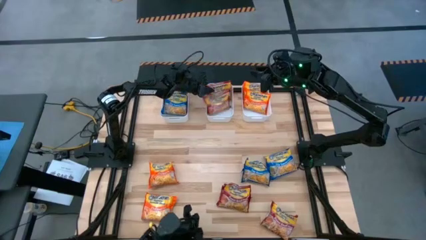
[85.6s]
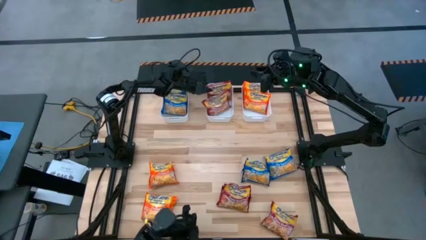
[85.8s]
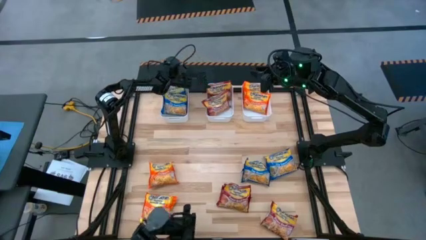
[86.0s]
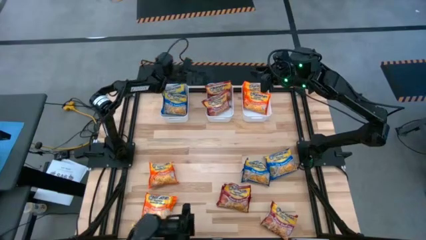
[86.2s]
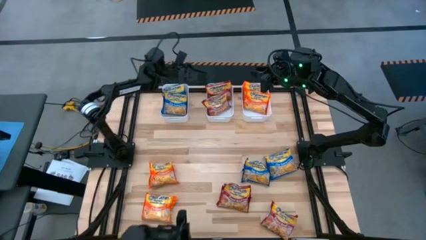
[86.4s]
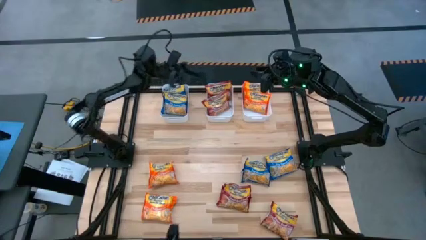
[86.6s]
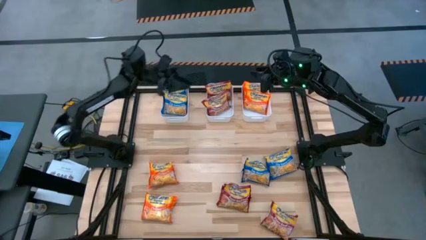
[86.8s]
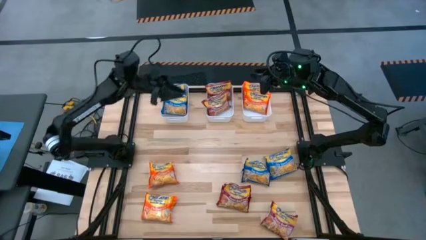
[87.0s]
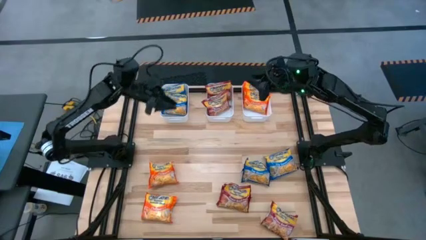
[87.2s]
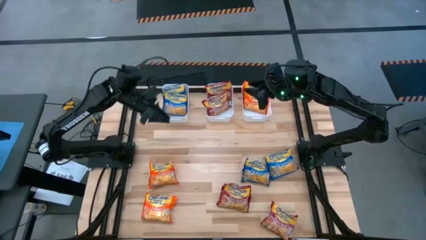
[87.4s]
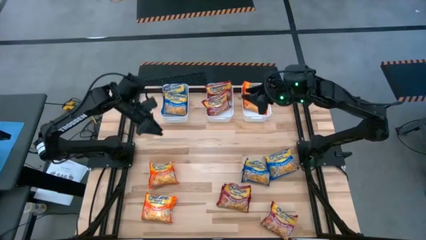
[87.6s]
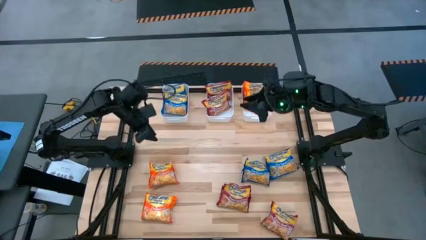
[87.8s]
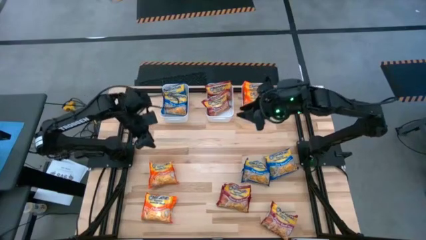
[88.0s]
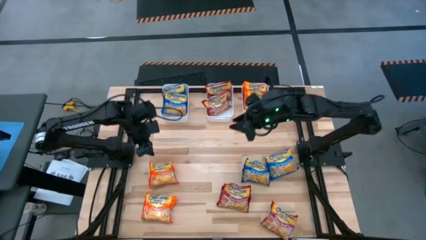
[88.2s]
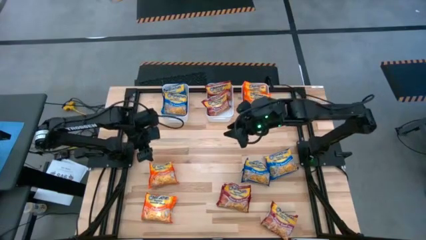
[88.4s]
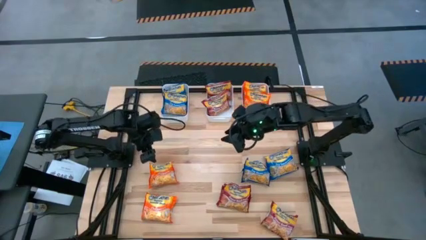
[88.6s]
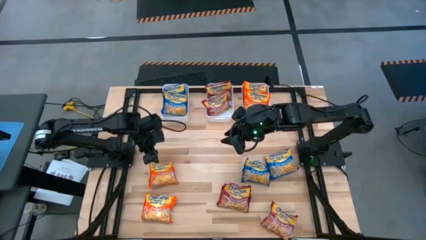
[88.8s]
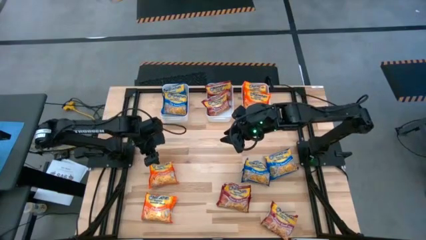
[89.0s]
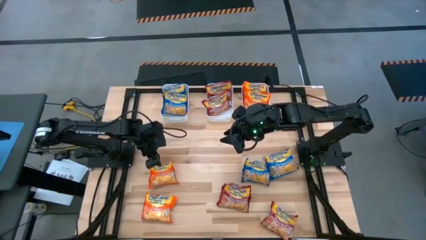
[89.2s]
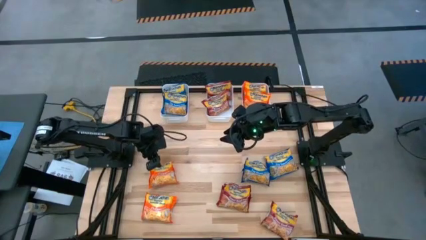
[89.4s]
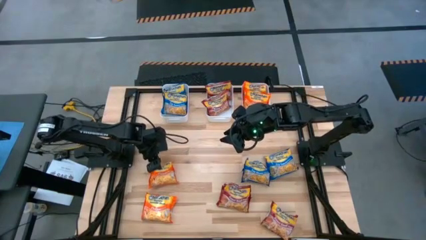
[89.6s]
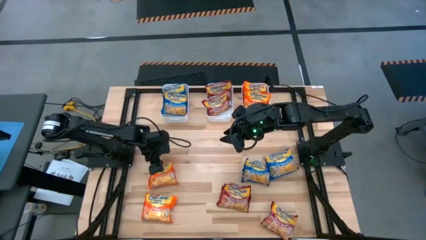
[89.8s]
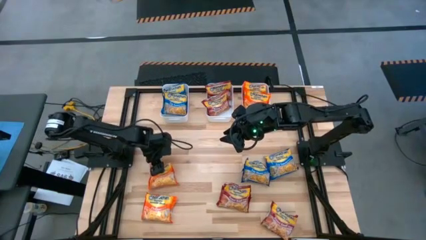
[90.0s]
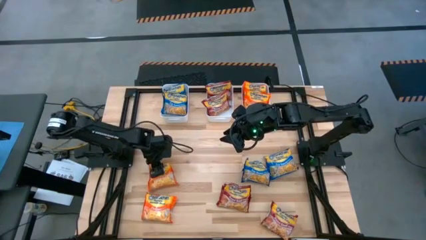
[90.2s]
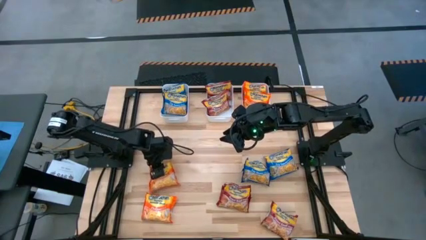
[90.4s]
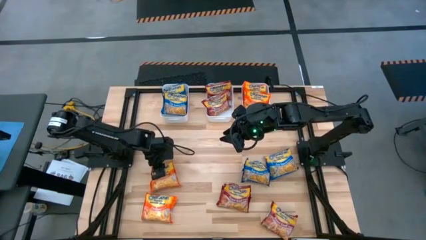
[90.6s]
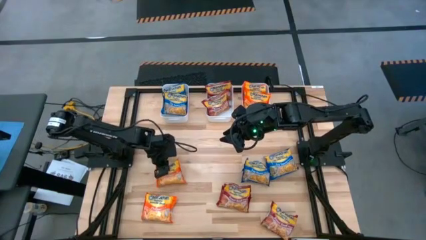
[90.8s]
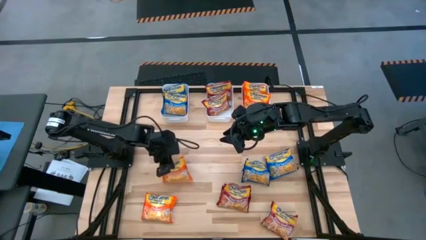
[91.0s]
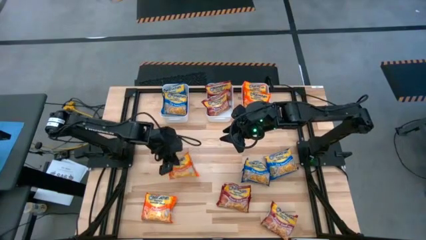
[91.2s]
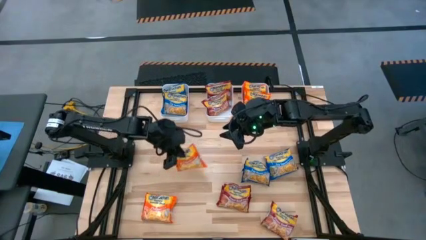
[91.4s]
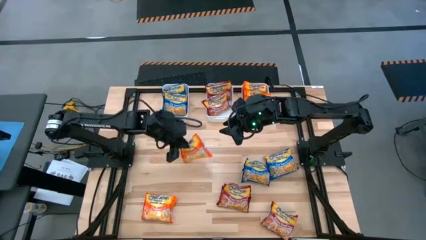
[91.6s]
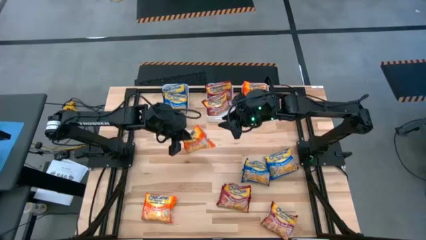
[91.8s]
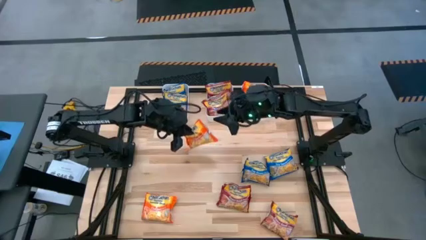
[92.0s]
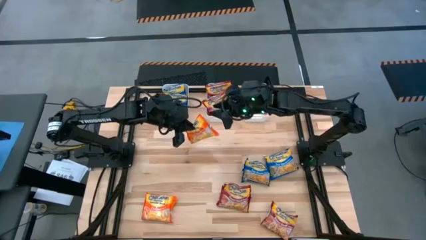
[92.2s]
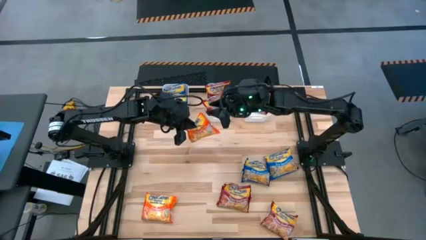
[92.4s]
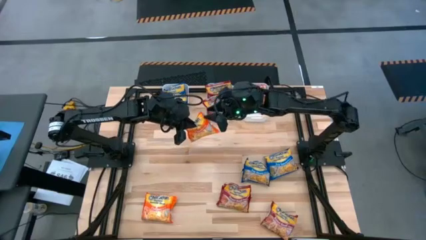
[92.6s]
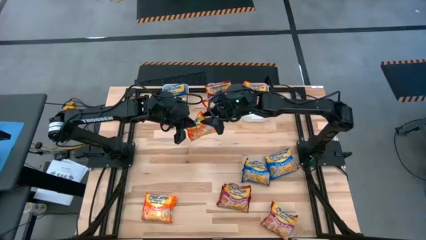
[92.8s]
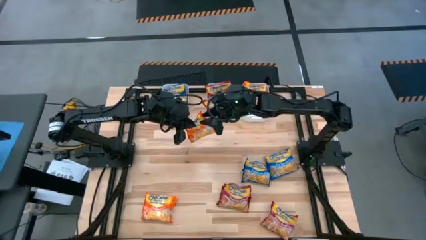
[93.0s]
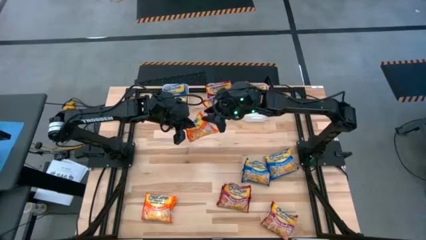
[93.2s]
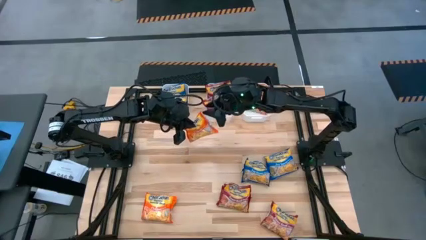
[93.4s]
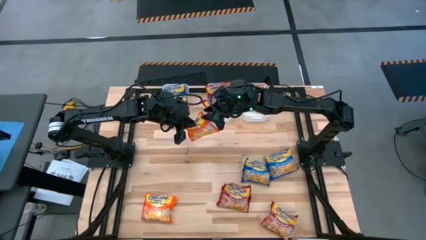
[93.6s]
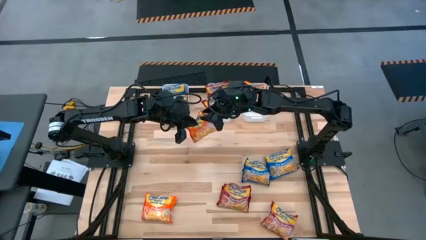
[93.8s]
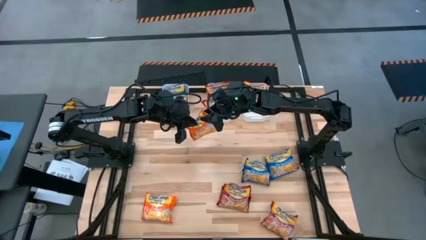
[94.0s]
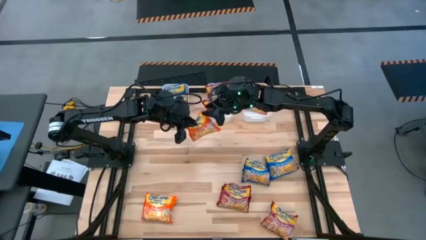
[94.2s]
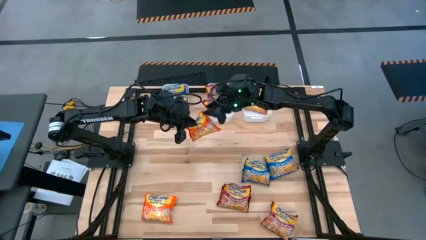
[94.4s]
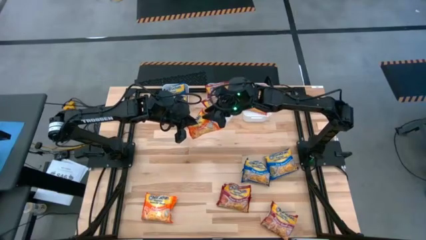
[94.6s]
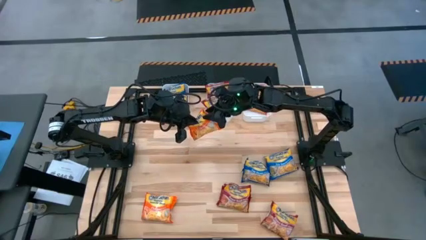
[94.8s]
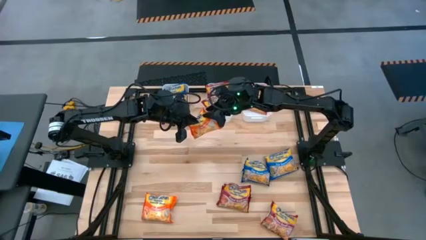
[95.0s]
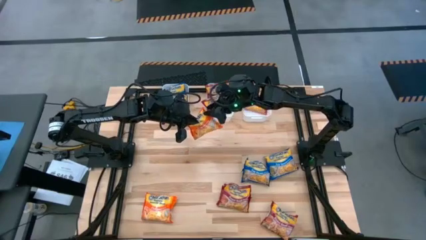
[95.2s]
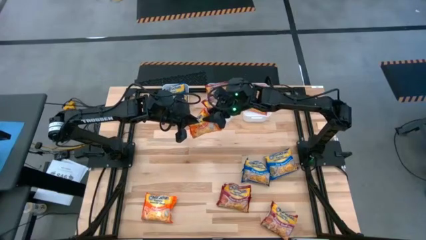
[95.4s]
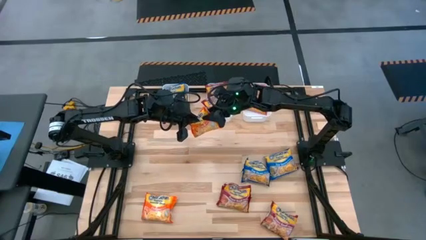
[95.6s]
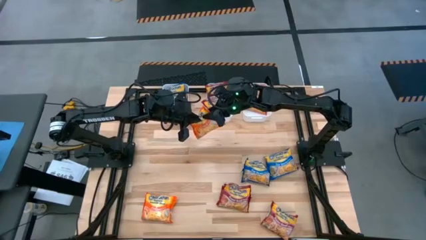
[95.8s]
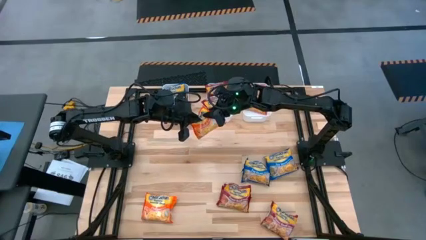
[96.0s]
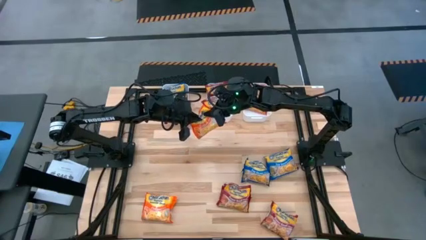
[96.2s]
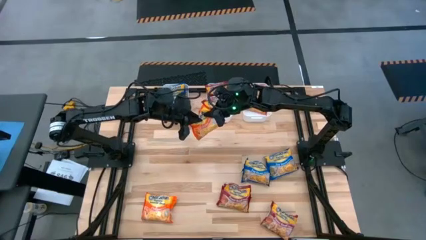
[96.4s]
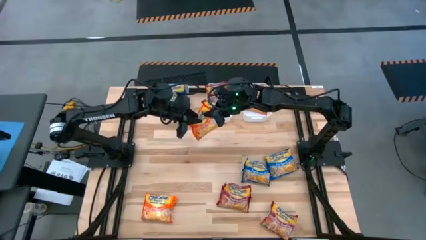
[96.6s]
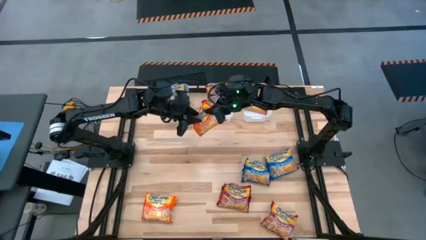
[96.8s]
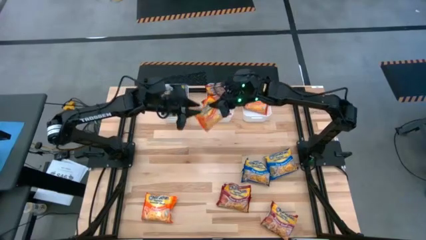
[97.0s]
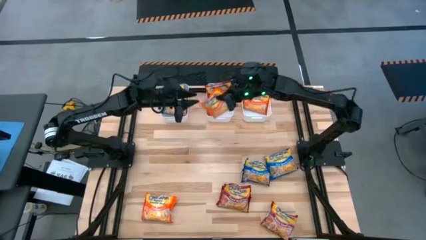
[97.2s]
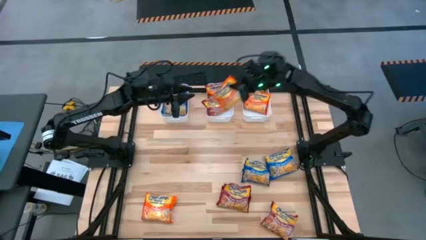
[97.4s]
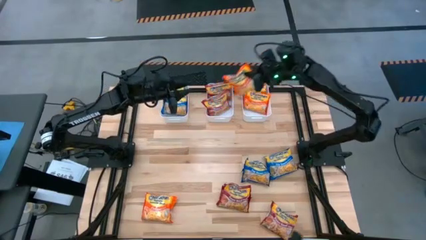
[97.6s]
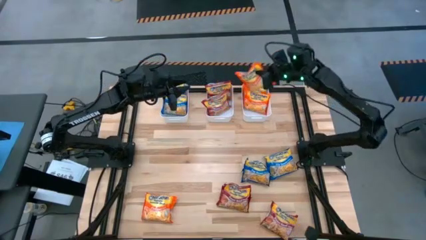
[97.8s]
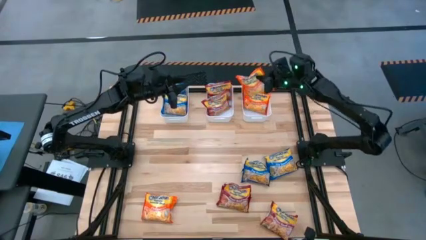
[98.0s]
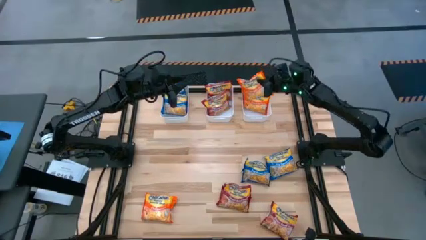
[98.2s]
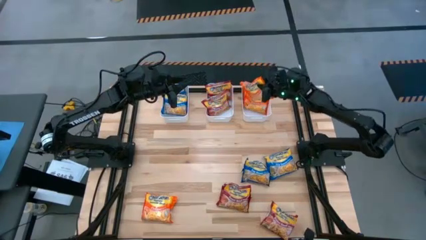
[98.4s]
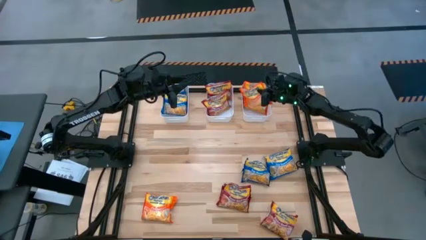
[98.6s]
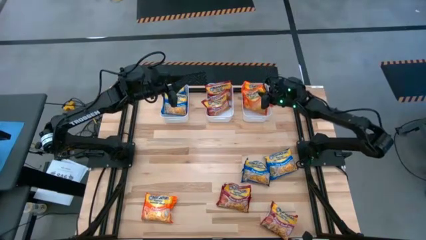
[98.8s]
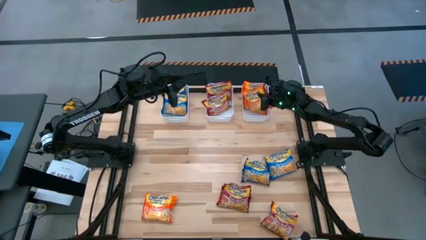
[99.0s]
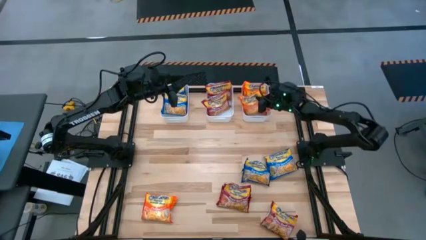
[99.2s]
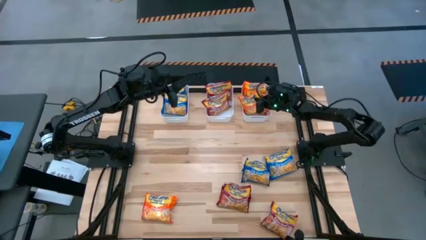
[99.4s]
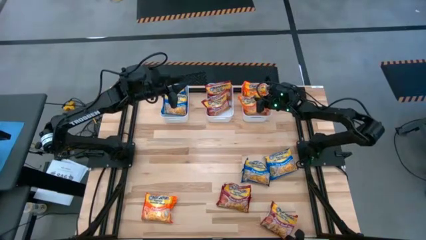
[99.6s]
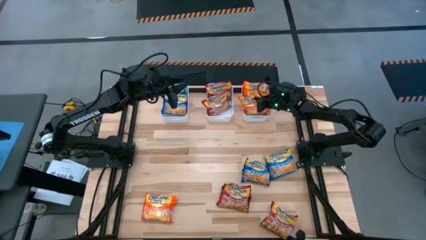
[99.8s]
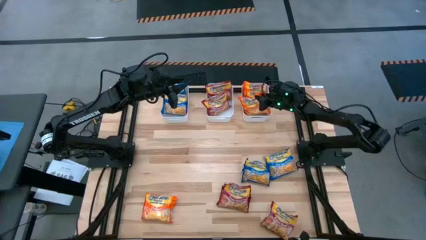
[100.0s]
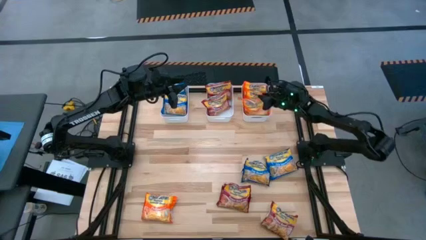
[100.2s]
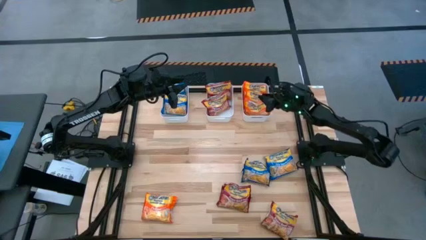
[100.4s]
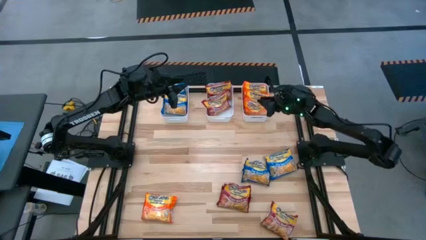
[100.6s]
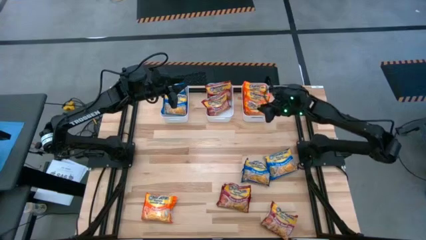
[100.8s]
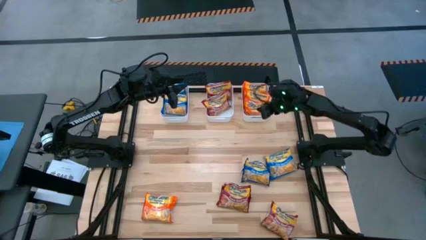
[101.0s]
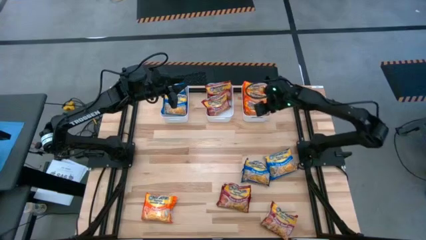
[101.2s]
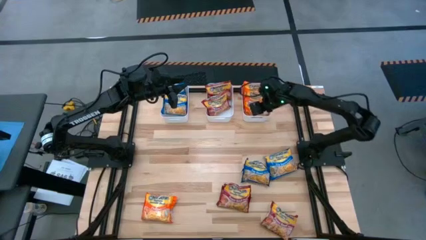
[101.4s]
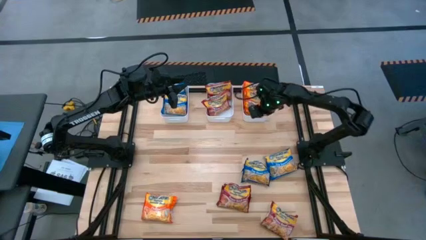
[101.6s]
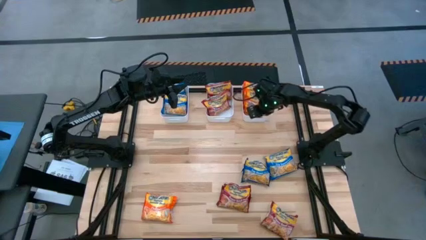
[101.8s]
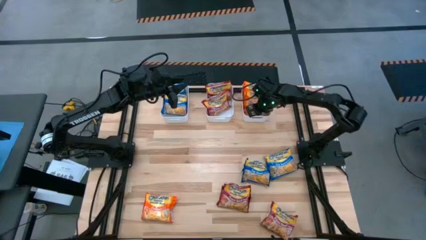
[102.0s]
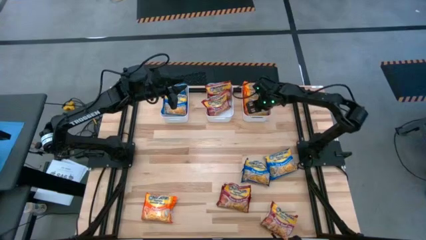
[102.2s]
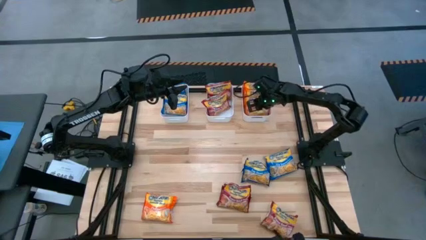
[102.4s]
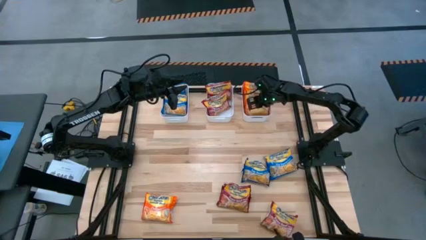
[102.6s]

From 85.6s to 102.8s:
Task: Sort Maruchan noodles
Put the orange noodle pack into the right white bin
